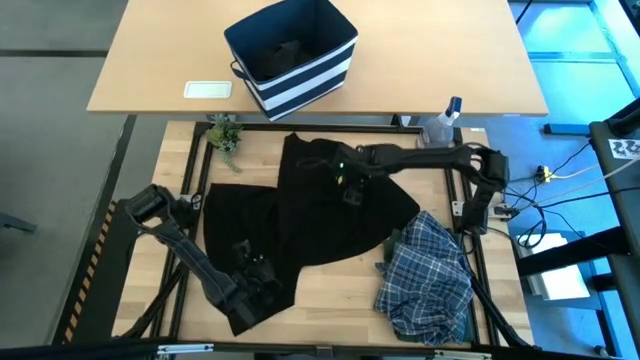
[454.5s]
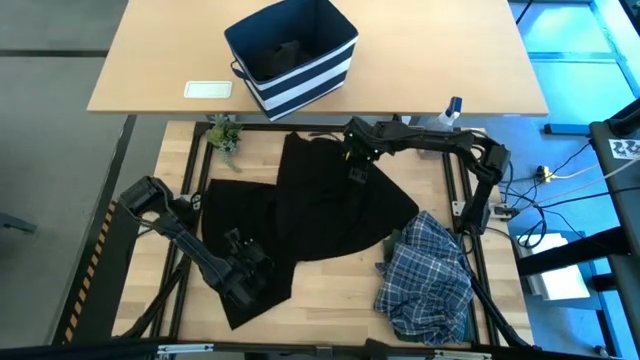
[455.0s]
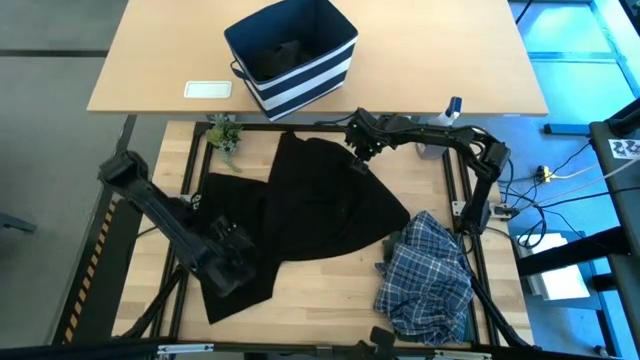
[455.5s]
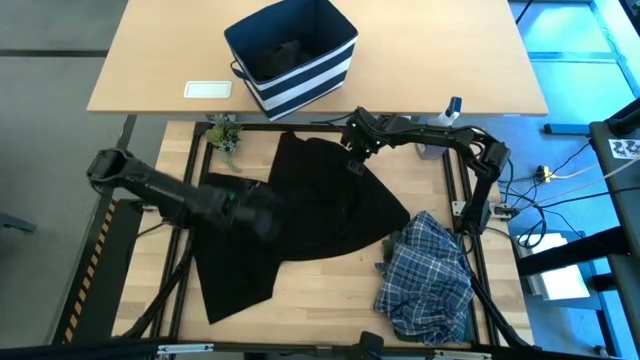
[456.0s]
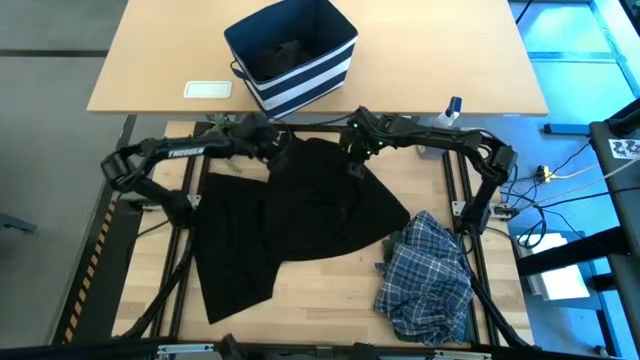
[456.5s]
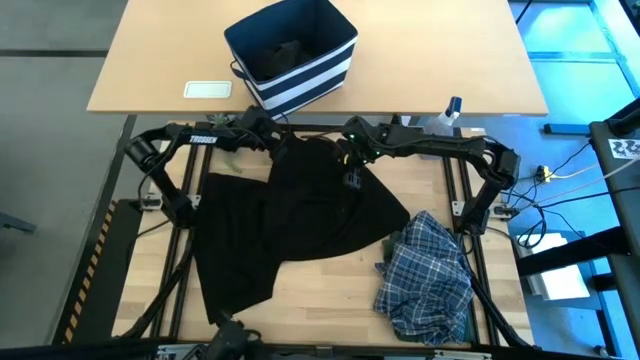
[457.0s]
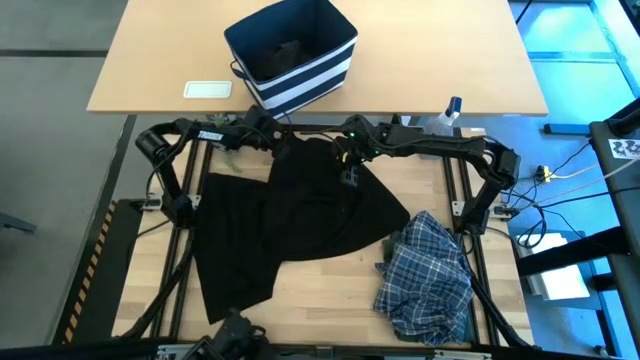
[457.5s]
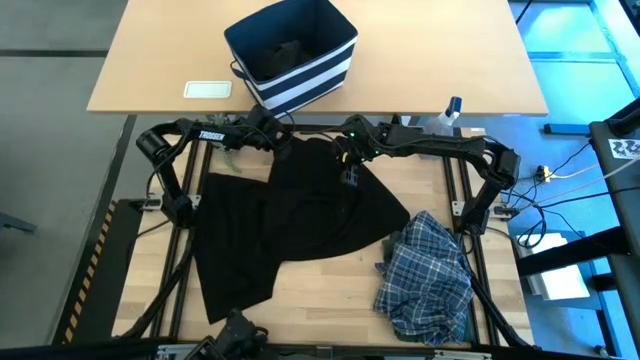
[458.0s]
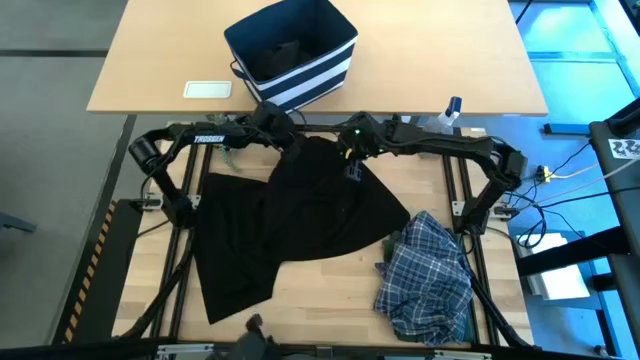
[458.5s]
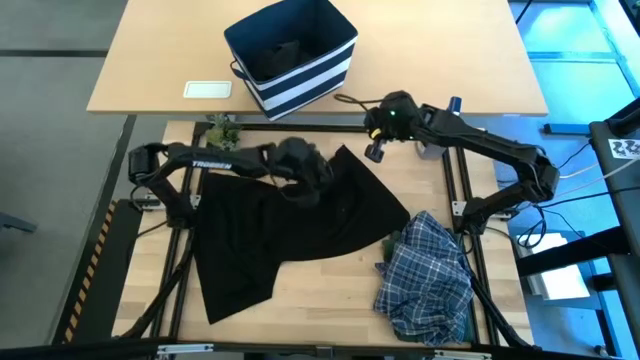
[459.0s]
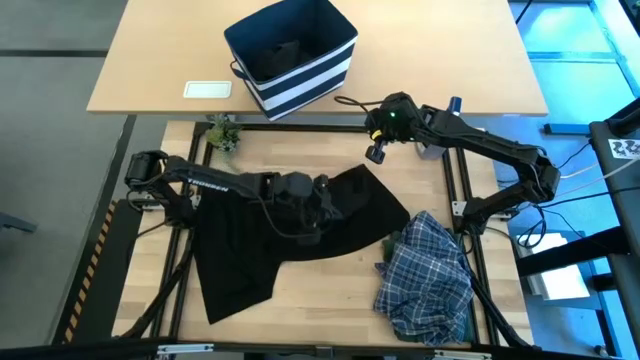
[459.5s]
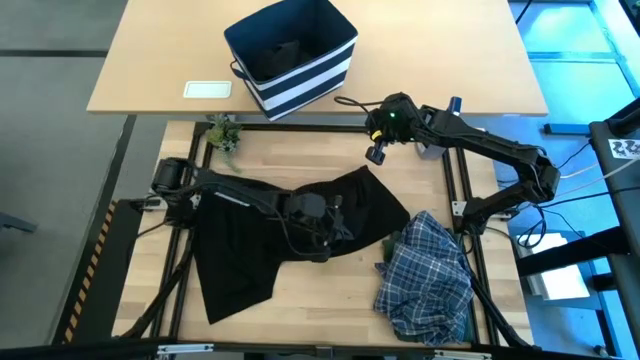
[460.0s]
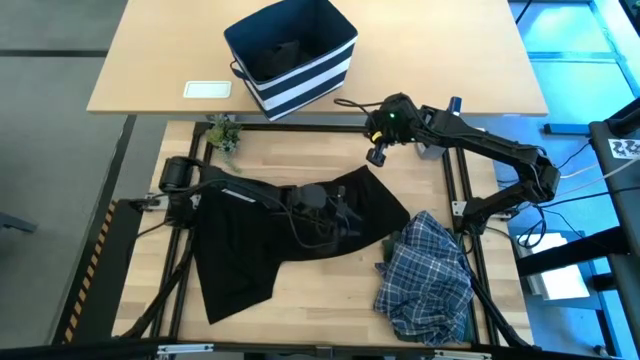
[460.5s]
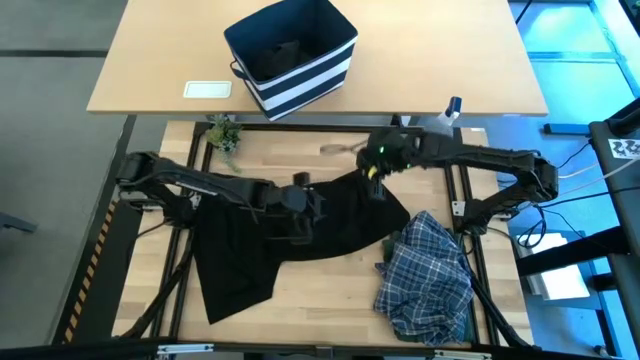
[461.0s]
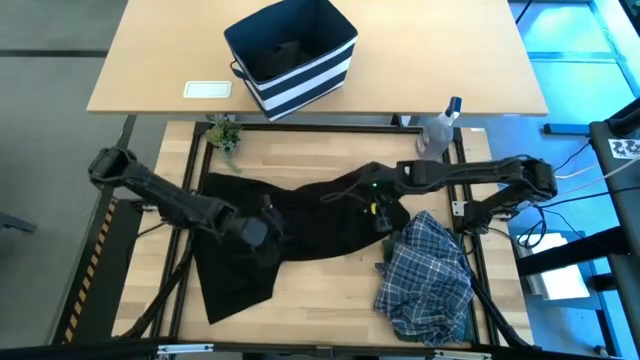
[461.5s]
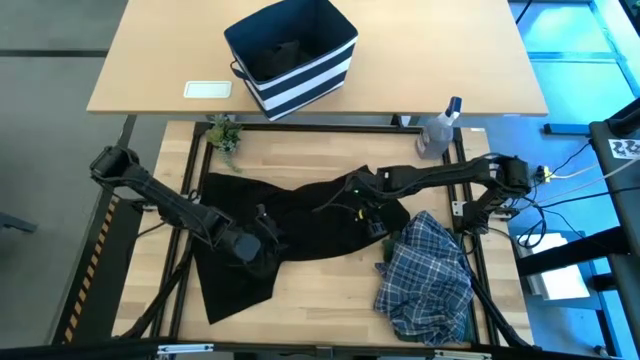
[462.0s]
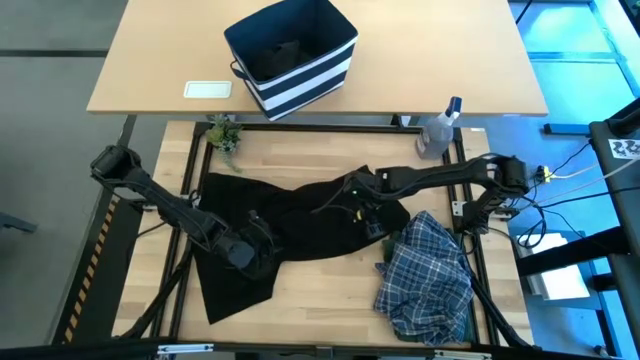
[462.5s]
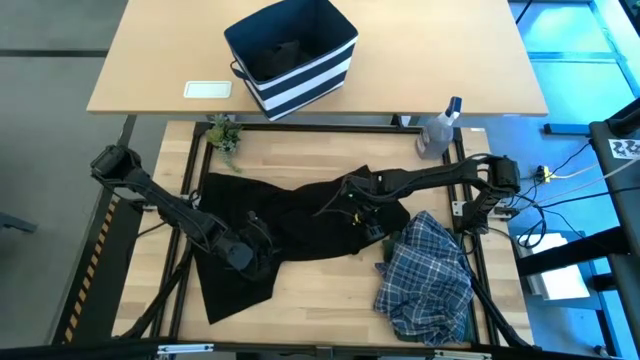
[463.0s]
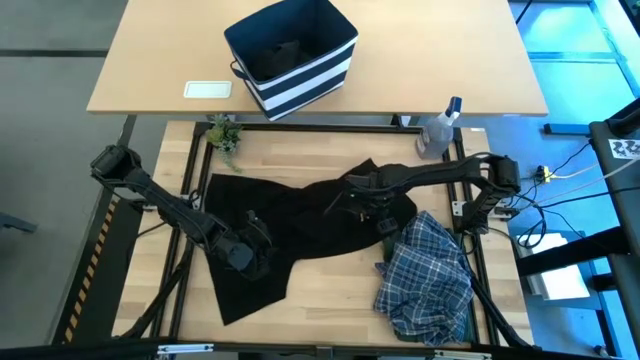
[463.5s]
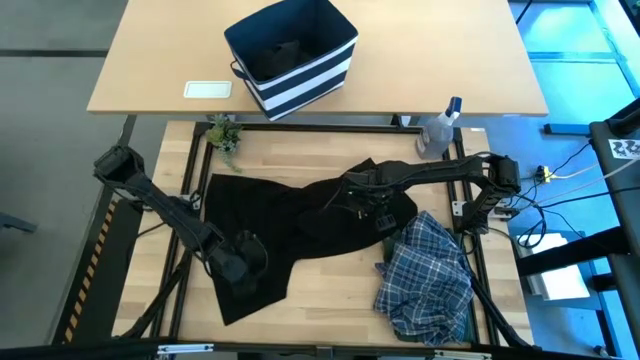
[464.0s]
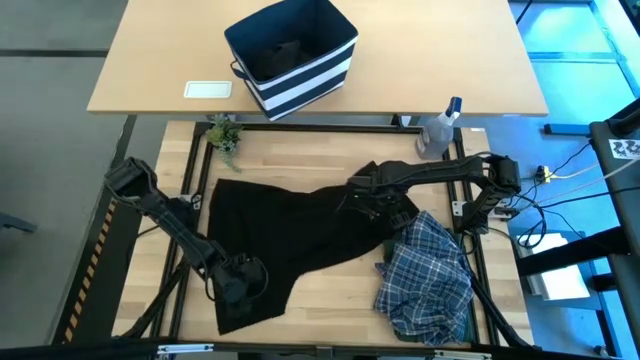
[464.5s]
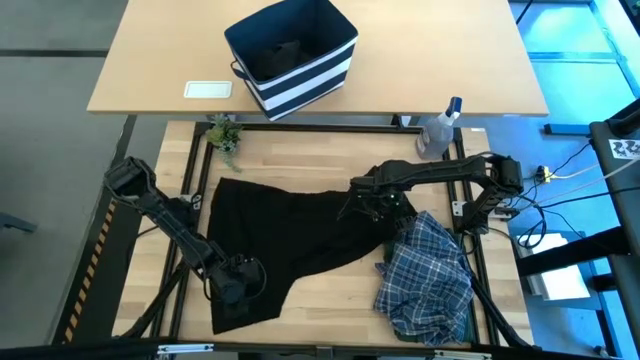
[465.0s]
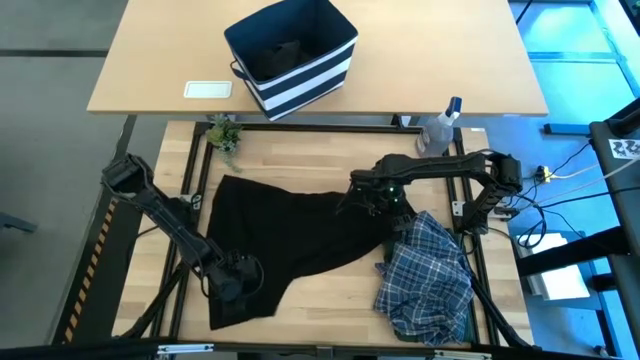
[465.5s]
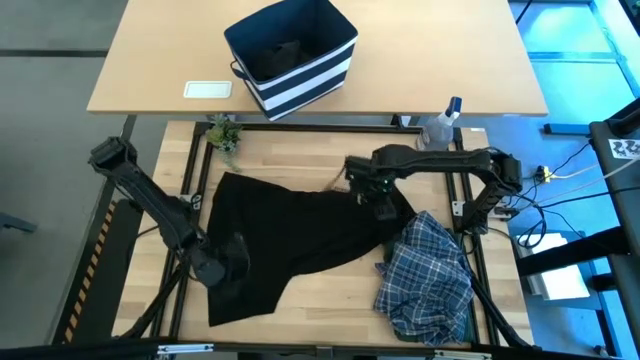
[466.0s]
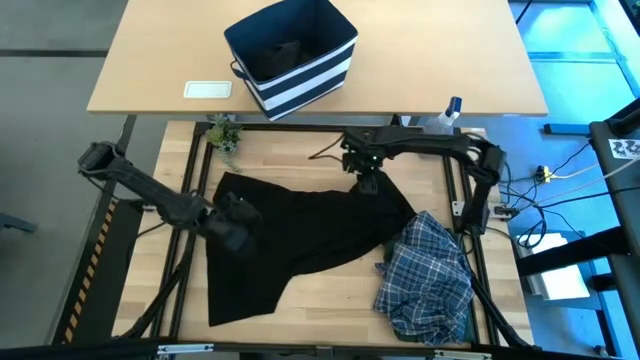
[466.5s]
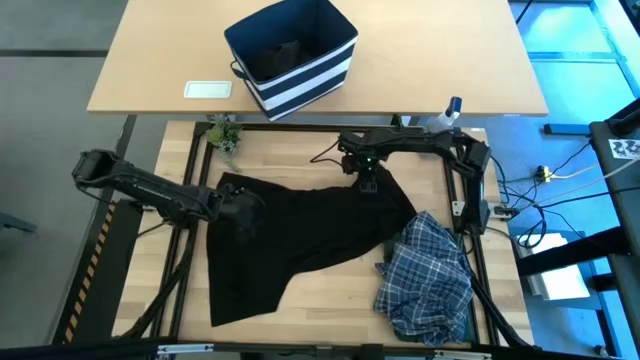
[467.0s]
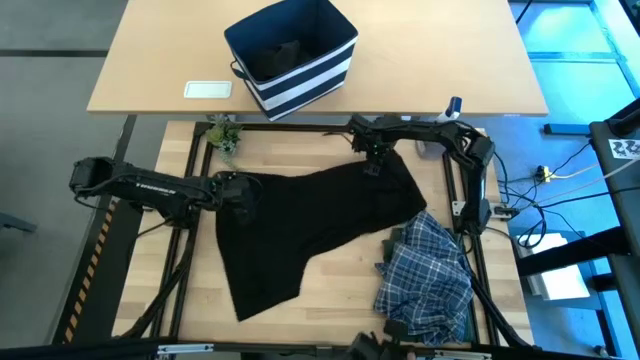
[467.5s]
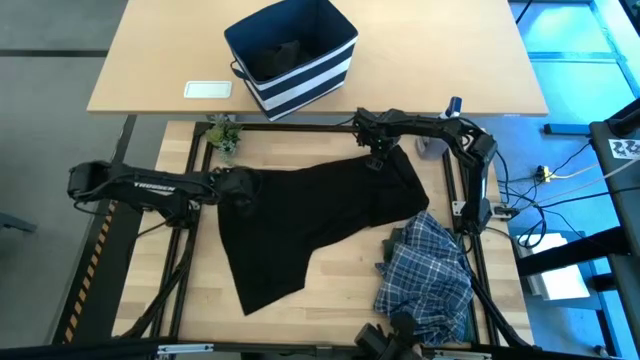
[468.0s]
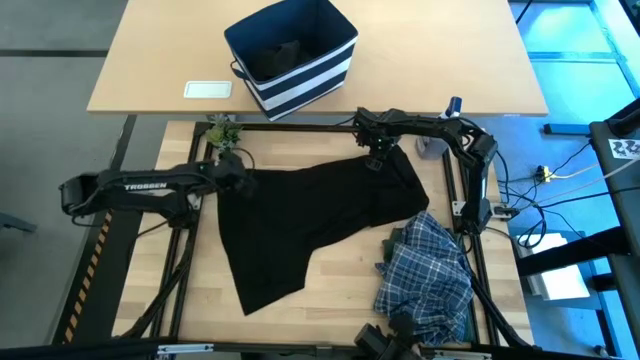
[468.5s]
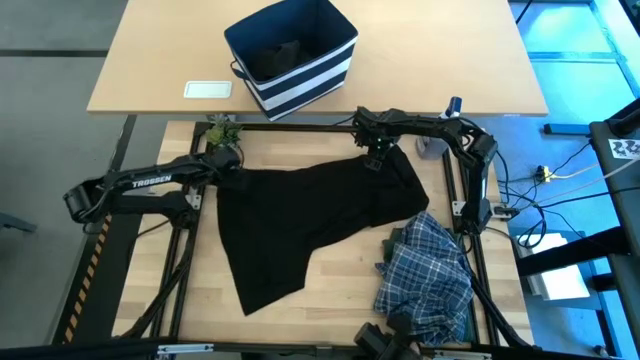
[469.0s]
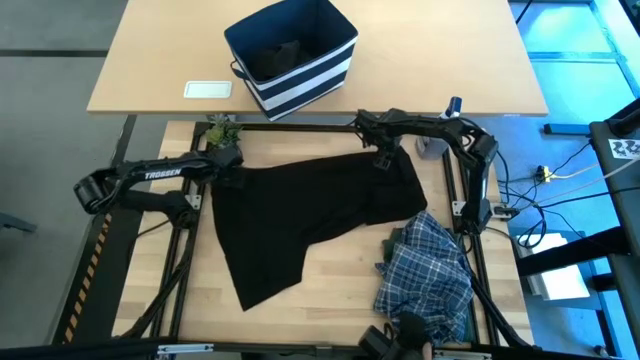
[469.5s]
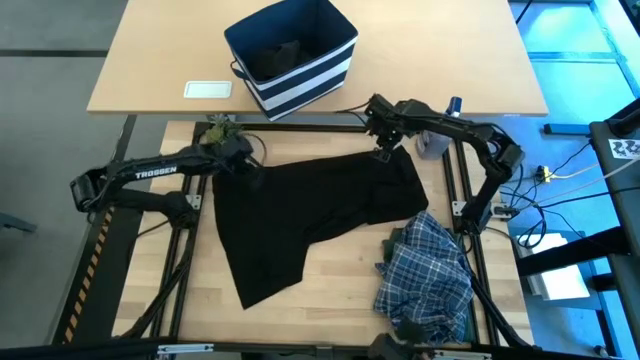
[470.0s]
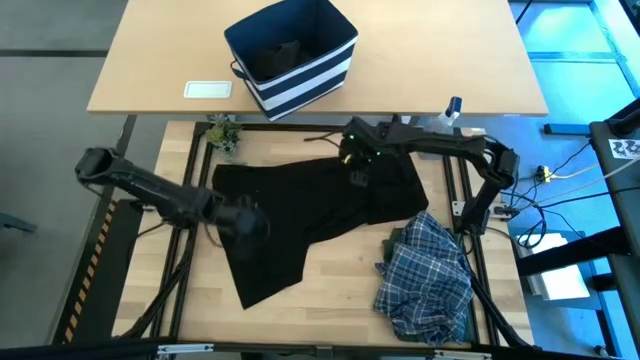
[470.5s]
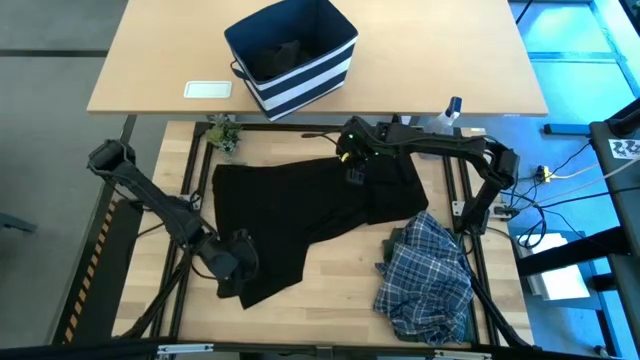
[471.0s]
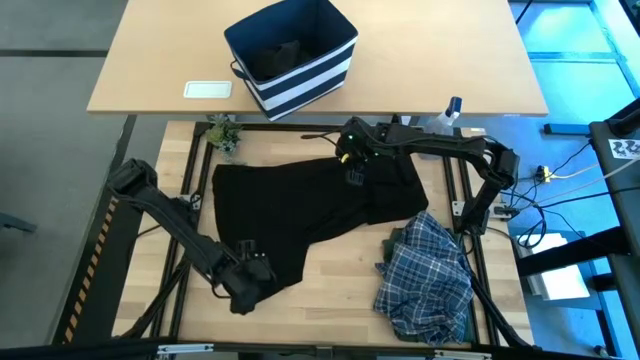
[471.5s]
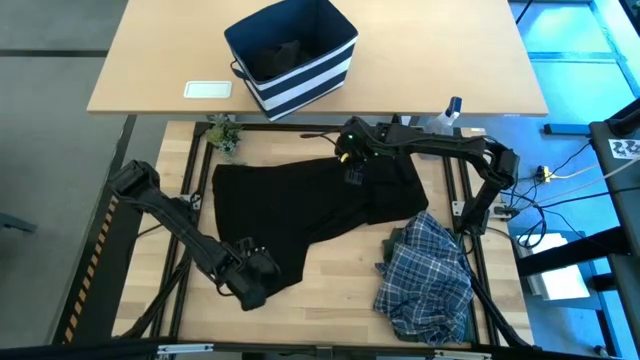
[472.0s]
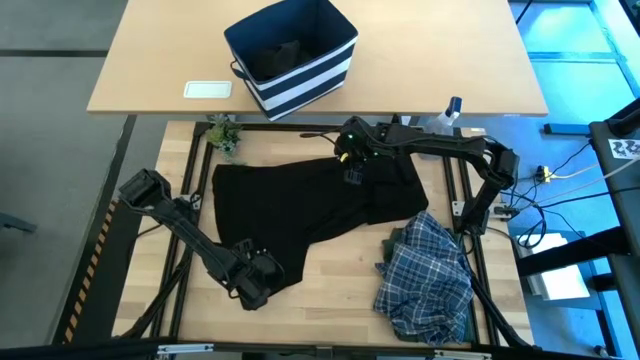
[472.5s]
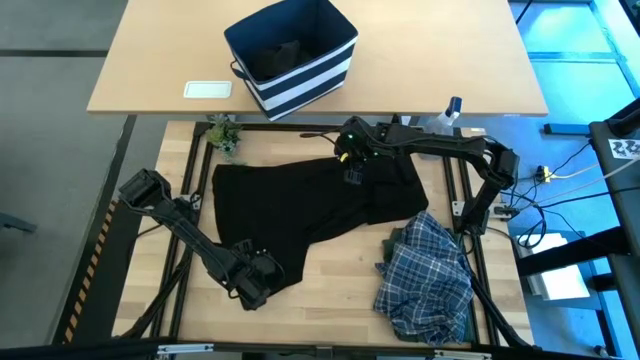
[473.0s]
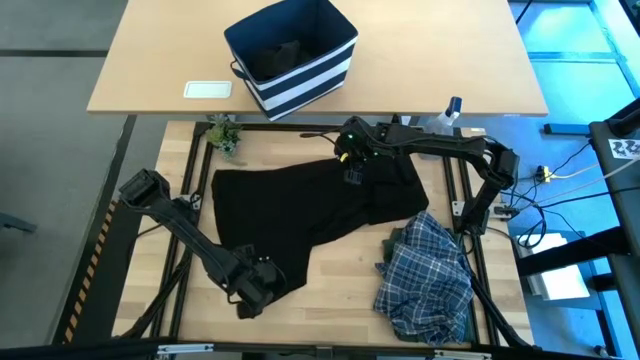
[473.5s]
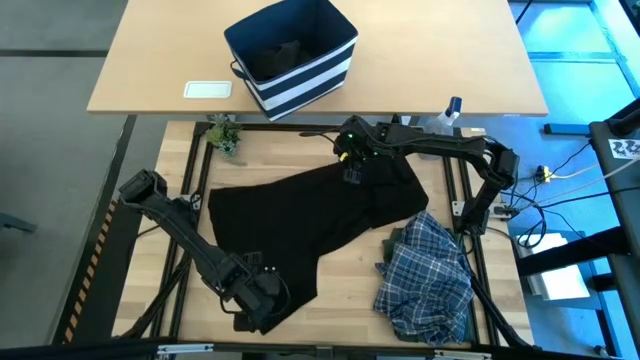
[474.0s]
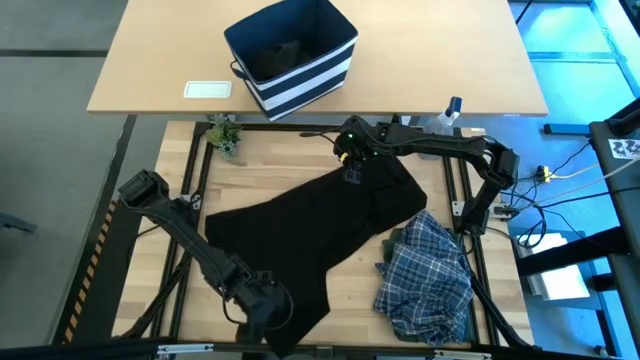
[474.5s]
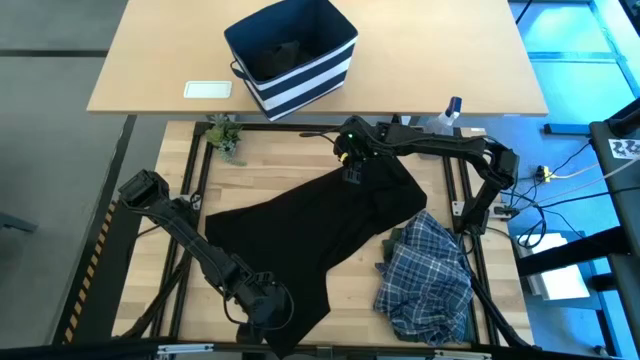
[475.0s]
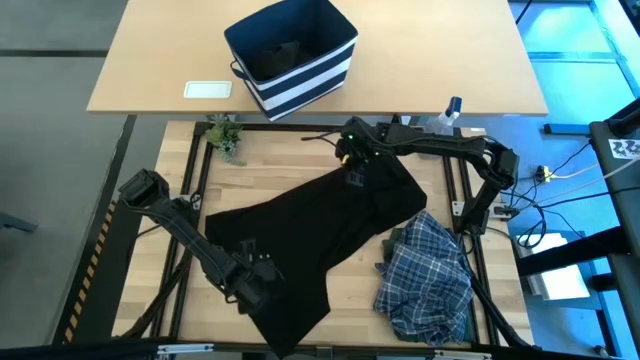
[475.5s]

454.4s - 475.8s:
Task: Fold Laundry from Bin
Fold the black shirt
